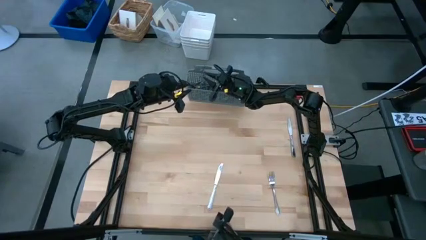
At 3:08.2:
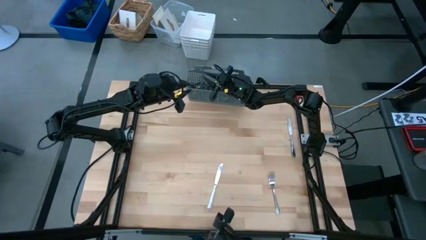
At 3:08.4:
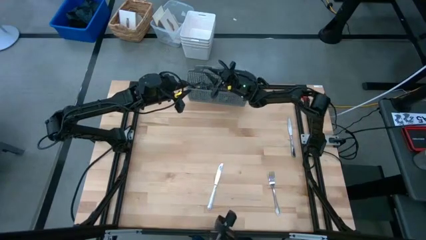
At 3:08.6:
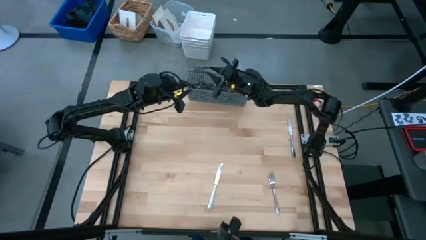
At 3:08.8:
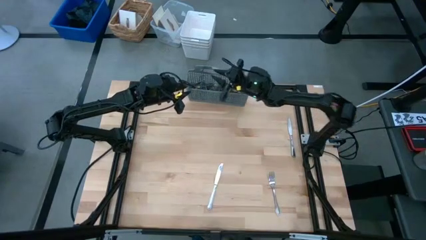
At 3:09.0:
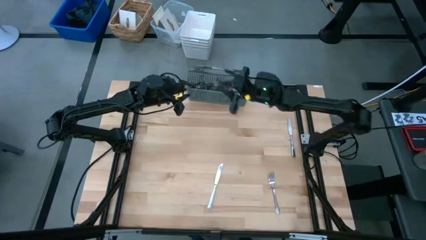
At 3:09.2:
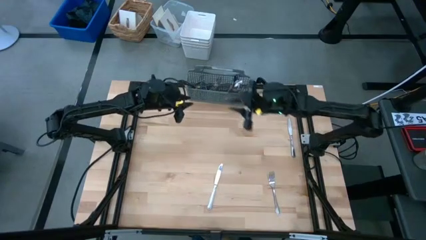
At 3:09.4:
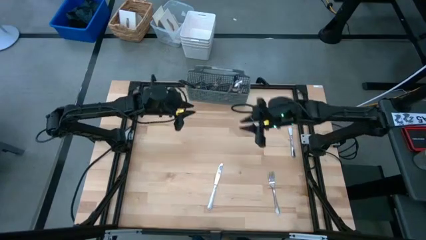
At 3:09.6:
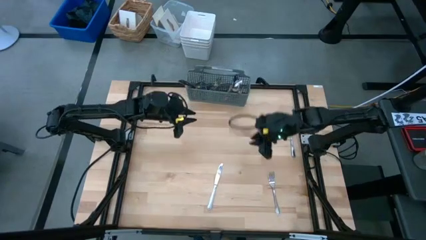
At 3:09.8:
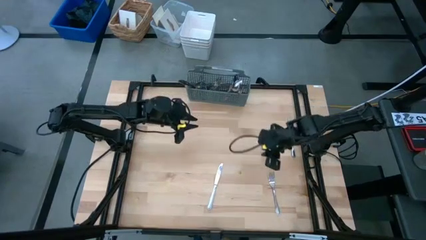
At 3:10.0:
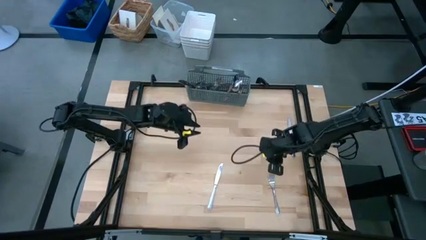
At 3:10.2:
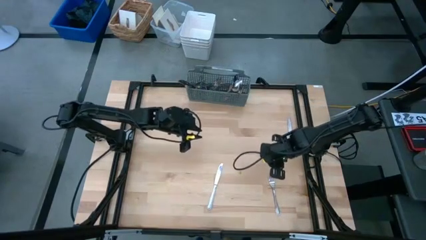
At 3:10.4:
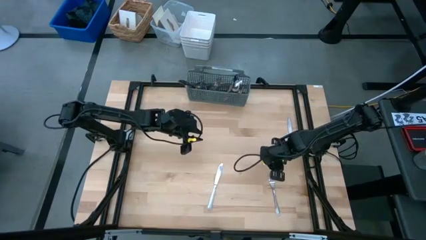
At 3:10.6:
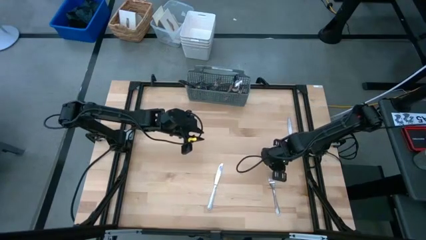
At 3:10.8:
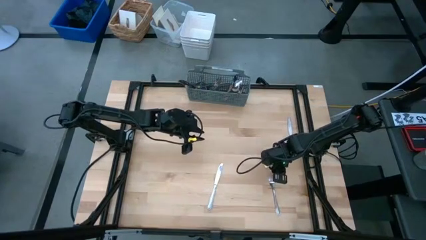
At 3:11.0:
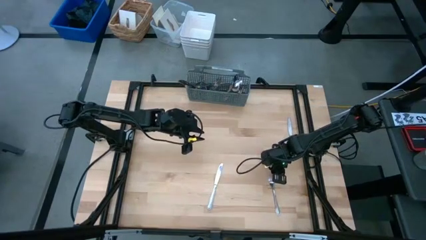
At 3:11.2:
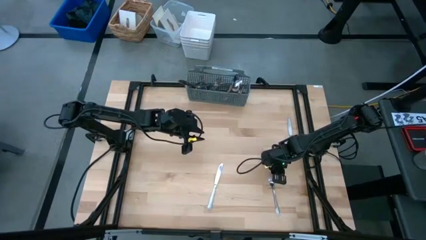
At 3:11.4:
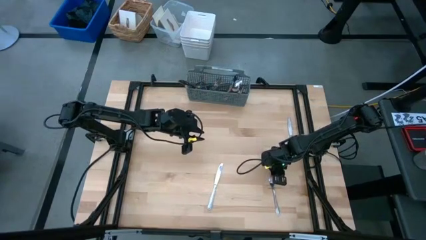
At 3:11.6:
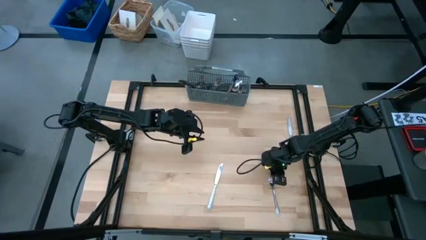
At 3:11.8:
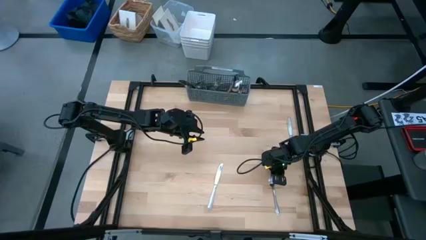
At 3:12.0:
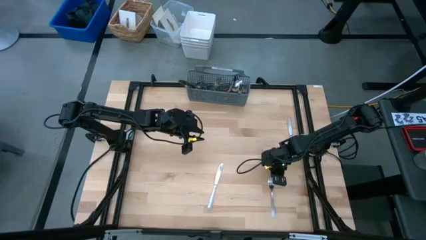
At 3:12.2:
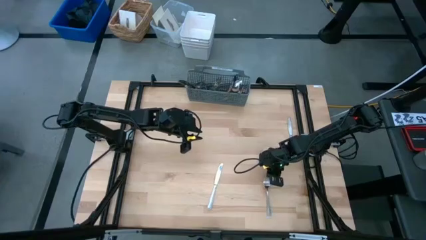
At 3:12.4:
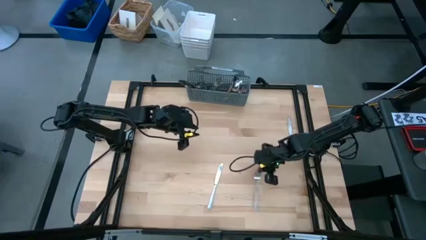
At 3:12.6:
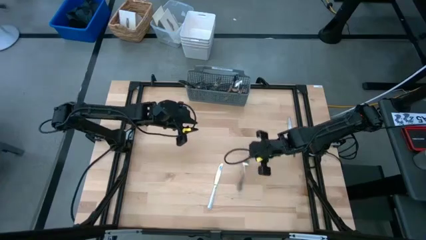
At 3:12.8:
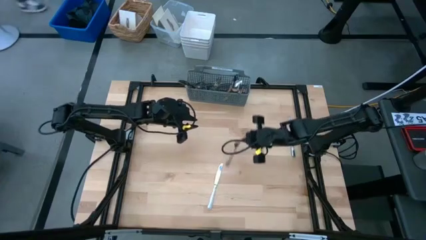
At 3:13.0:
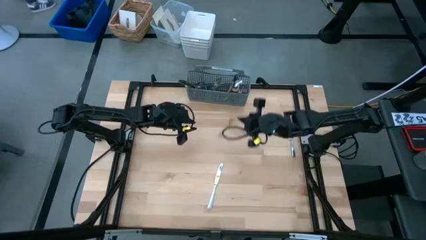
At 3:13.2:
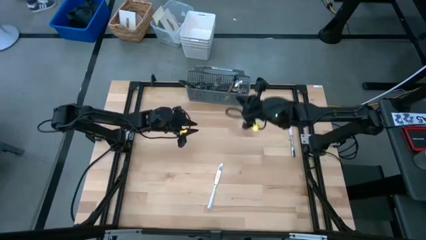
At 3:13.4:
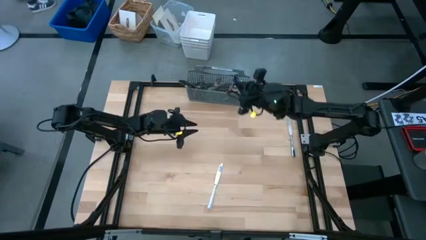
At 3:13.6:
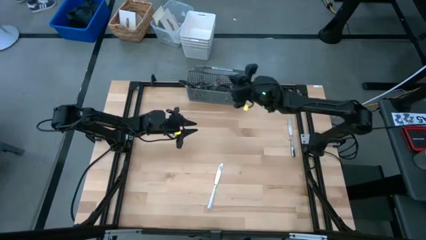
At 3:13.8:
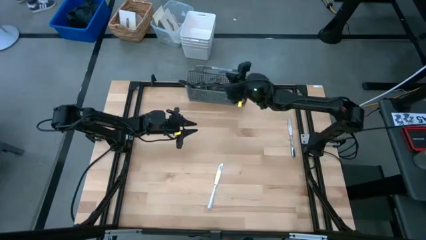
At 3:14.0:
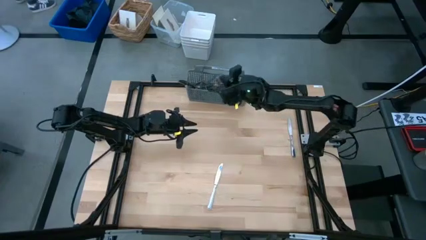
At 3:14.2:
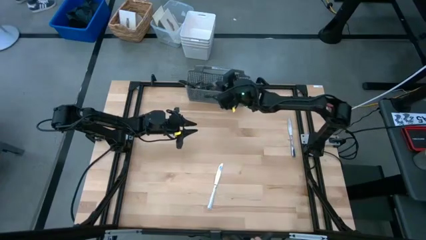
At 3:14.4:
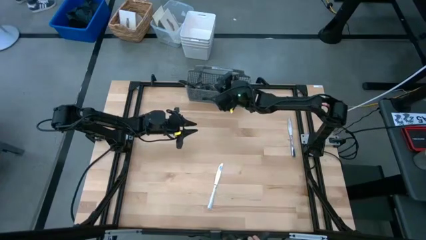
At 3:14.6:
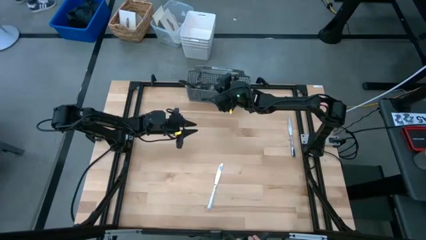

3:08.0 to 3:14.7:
Task: Sort silverware
Put the fork into the gray silverware organizer

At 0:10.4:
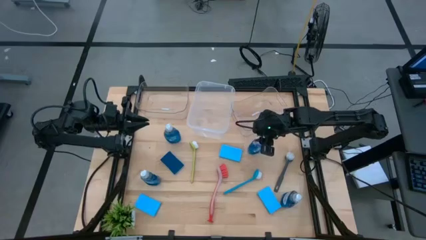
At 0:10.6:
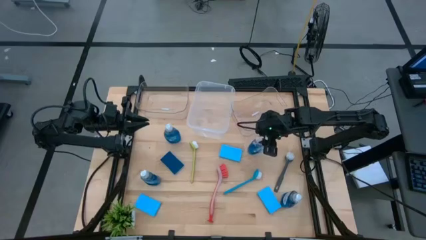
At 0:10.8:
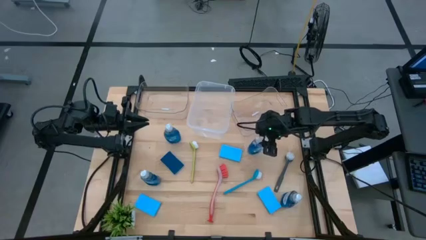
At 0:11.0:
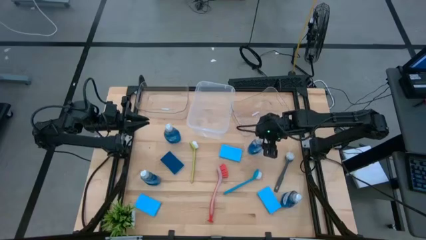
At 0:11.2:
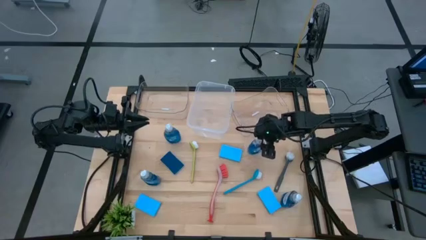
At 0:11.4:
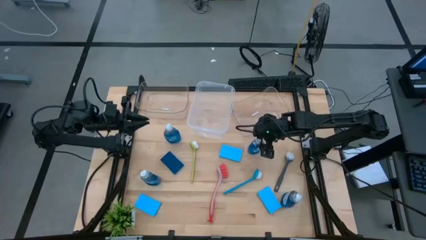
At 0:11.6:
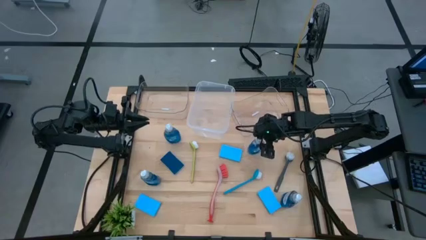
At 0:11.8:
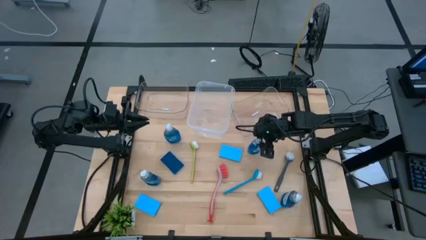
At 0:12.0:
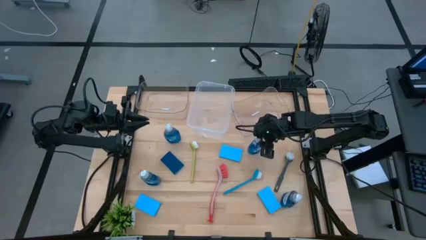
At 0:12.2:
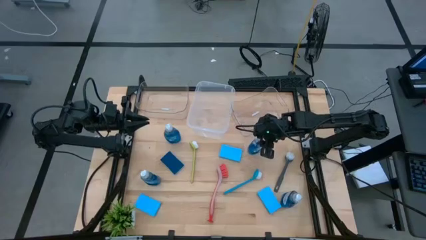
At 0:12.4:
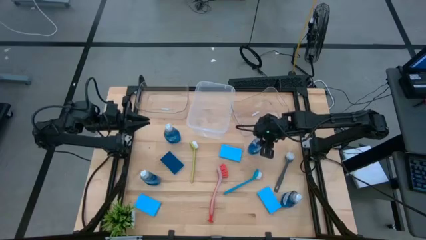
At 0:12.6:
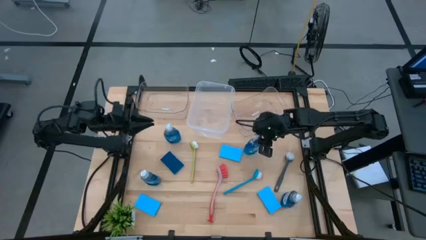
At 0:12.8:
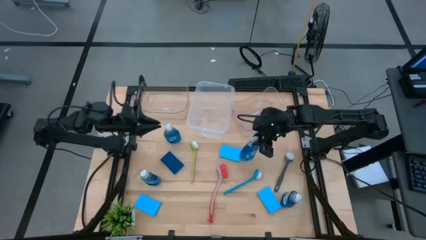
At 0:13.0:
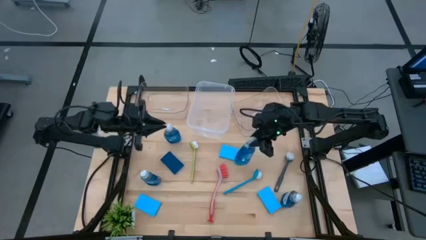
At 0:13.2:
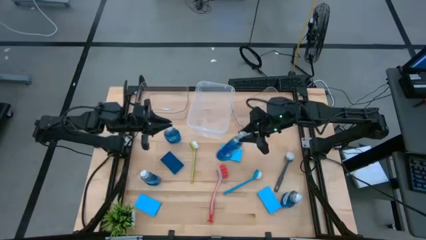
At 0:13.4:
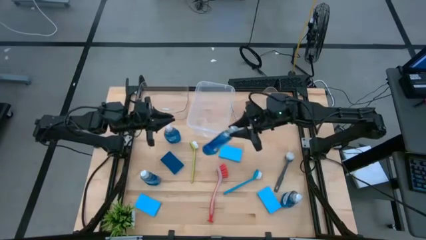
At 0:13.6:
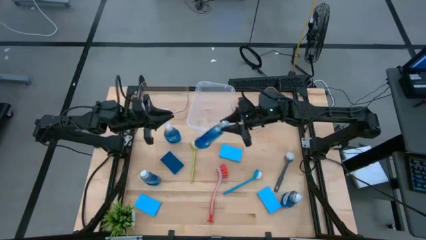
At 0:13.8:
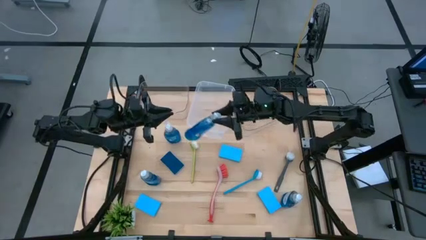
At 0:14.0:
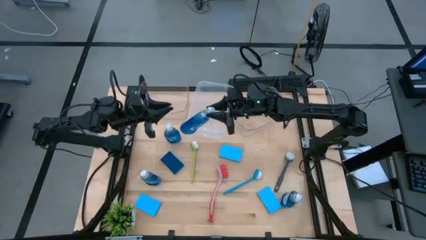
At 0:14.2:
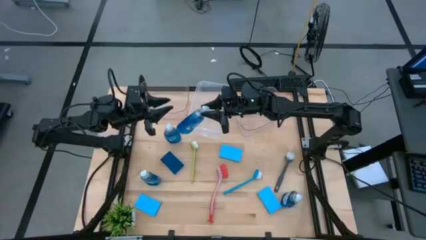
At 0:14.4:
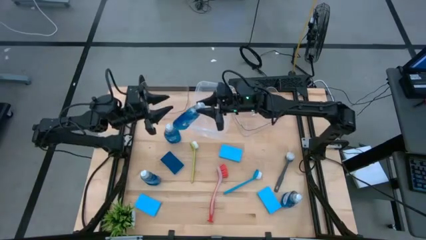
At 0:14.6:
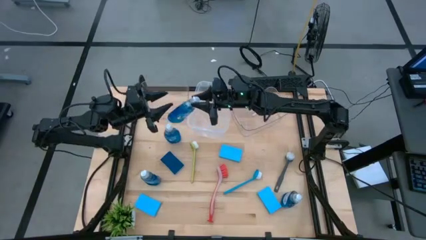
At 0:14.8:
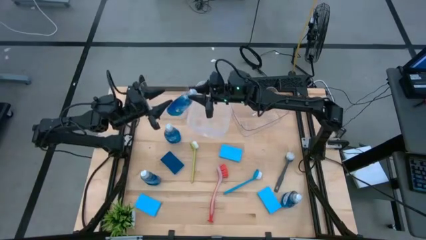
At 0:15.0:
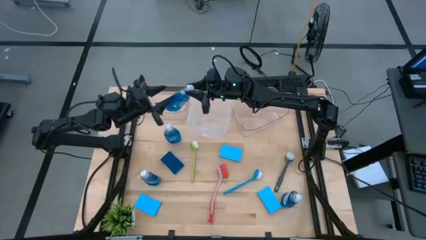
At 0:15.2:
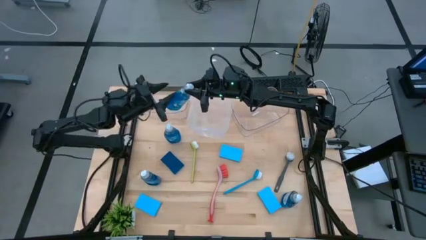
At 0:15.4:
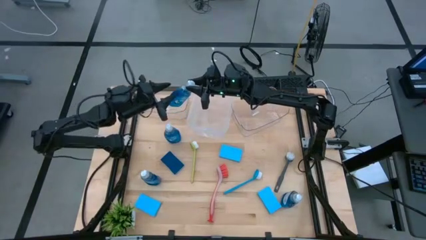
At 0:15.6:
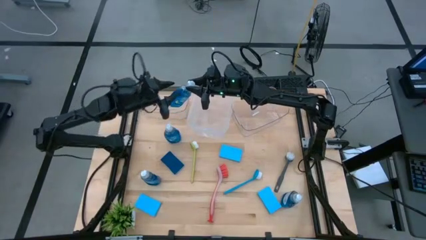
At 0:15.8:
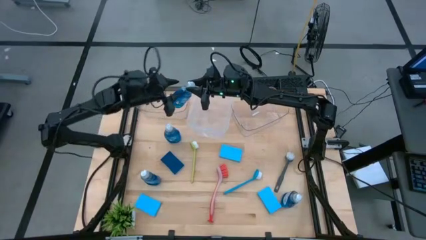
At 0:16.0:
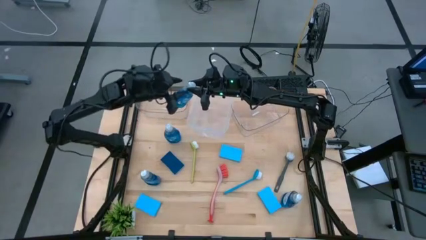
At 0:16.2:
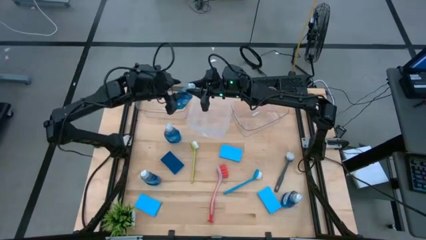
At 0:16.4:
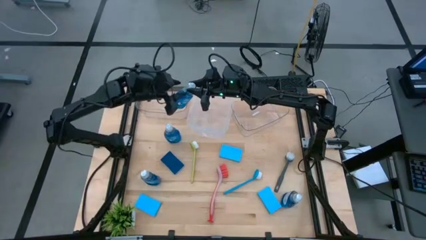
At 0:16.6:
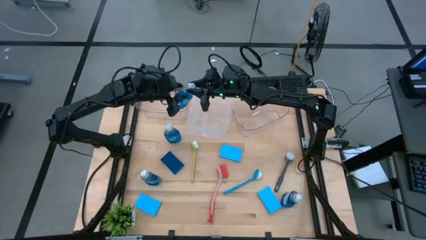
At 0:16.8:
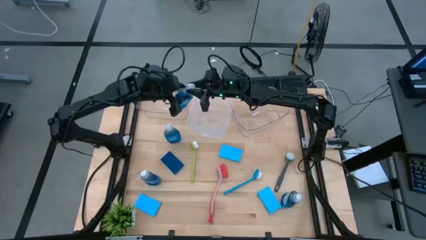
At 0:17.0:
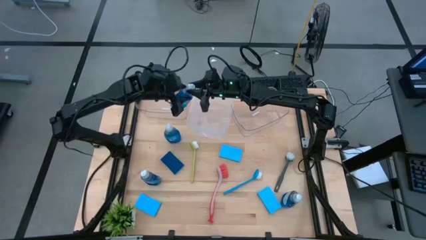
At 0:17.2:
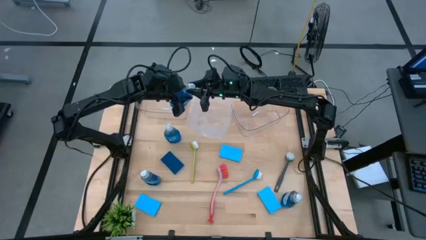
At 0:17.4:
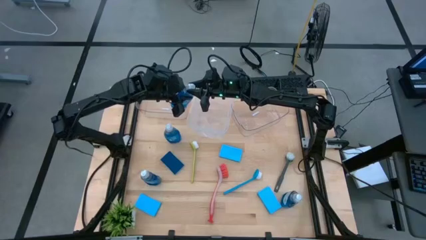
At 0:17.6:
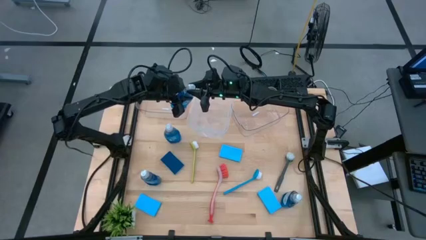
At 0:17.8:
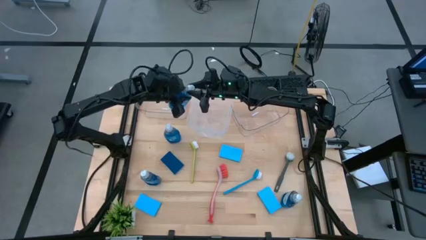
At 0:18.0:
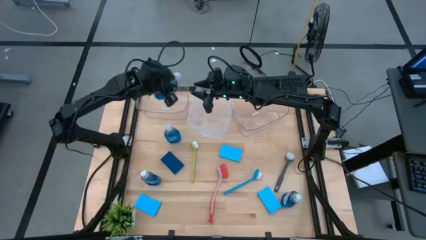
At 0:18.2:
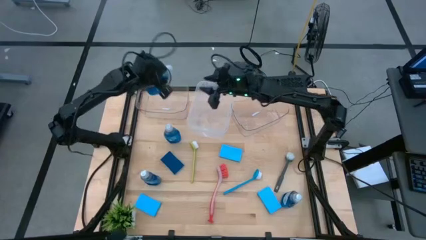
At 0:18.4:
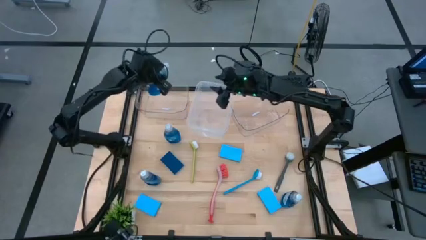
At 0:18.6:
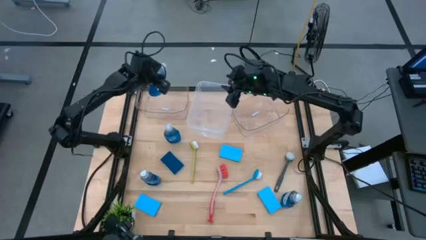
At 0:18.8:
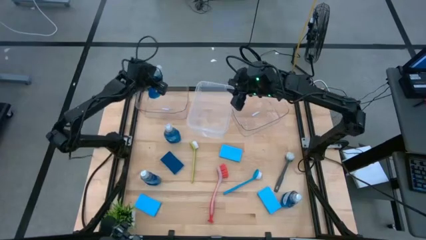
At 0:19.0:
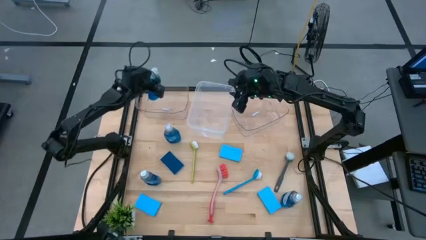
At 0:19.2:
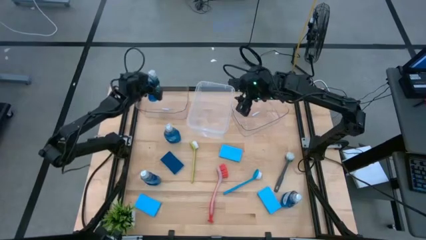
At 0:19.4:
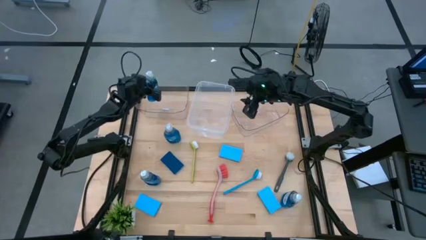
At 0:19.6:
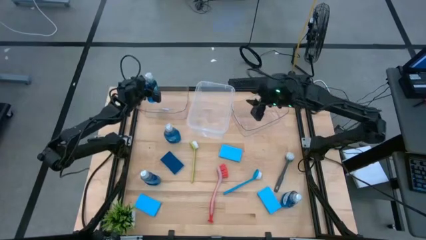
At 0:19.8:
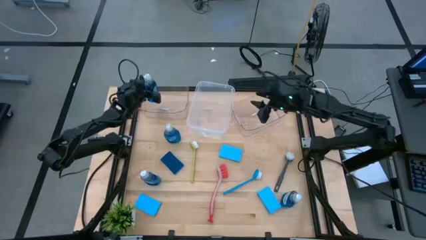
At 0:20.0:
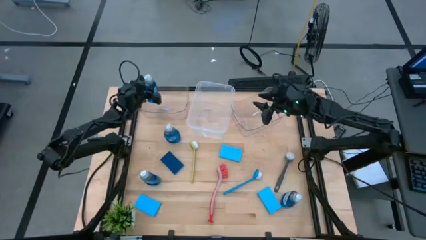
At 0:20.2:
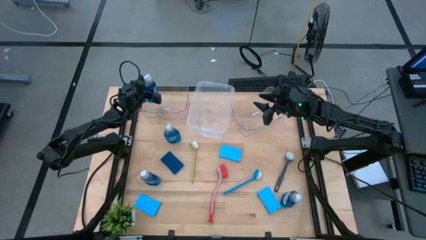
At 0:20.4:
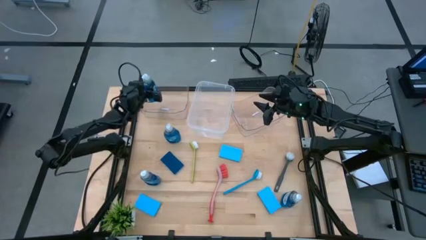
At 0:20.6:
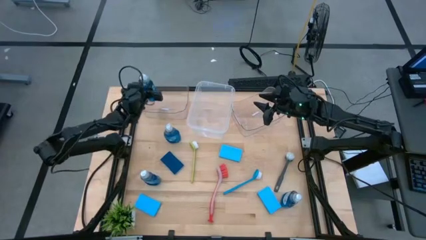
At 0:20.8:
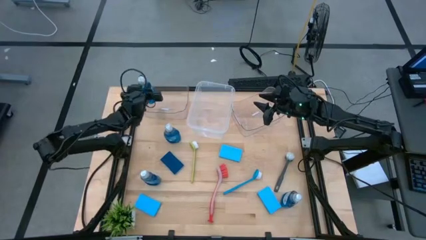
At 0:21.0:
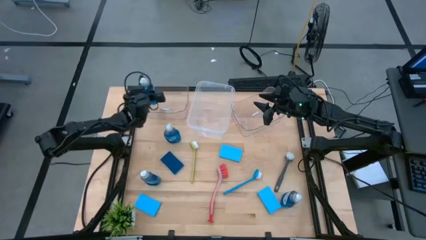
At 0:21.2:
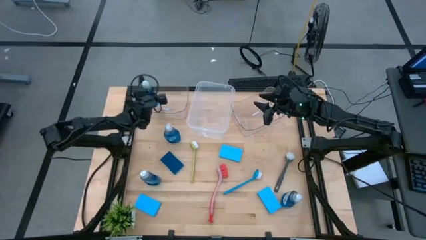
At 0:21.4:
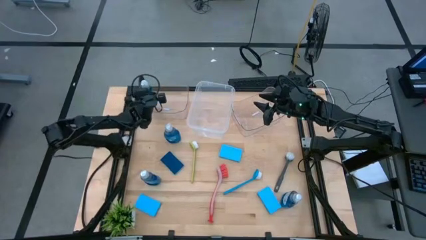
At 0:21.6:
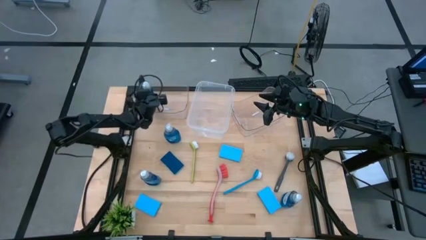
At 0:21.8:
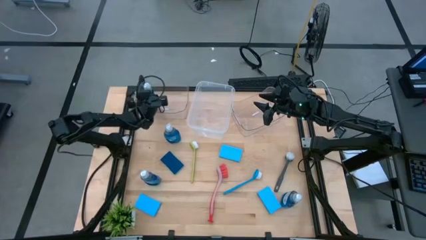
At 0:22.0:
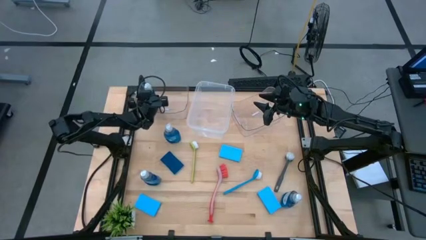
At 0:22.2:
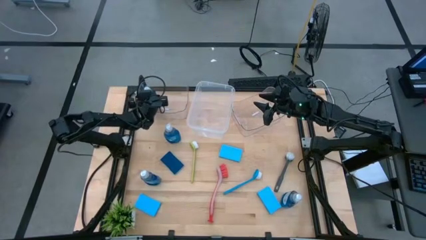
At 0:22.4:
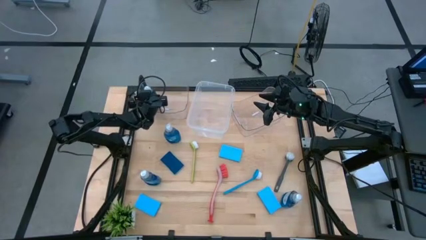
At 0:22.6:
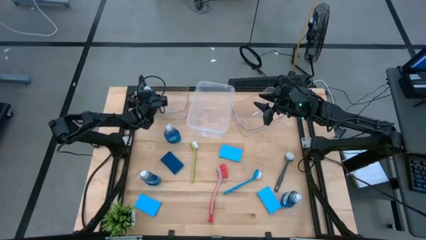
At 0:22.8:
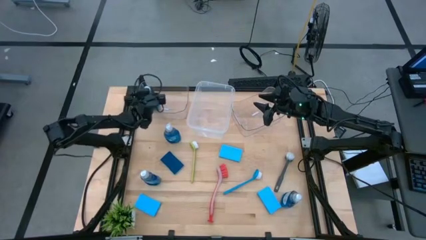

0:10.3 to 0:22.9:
Task: Pick & Place Kitchen Sink Supplies
Put the dish soap into the left transparent bin
